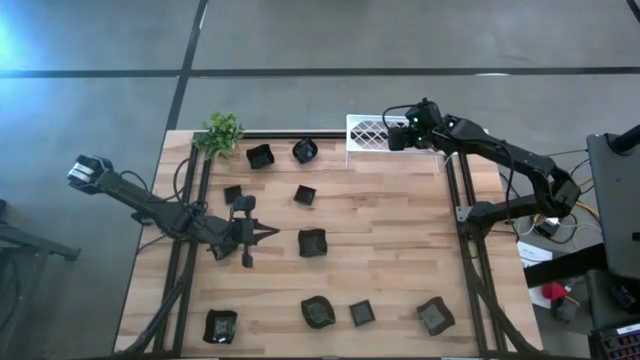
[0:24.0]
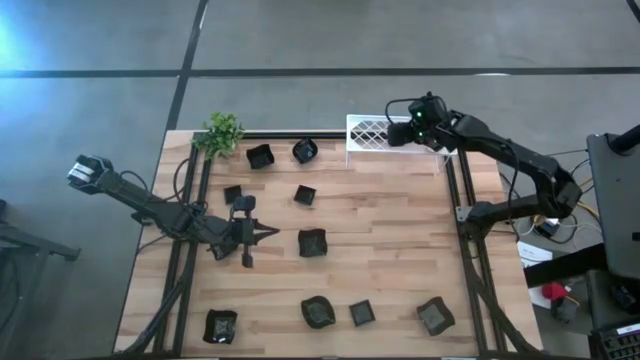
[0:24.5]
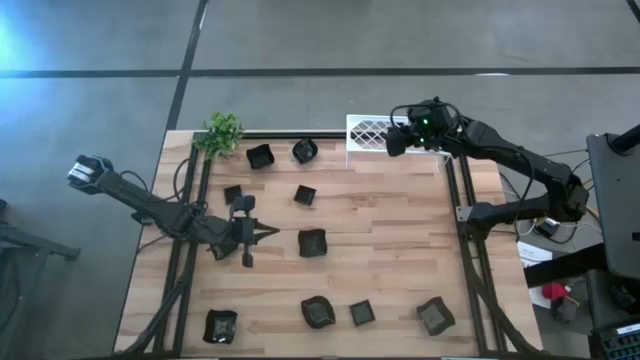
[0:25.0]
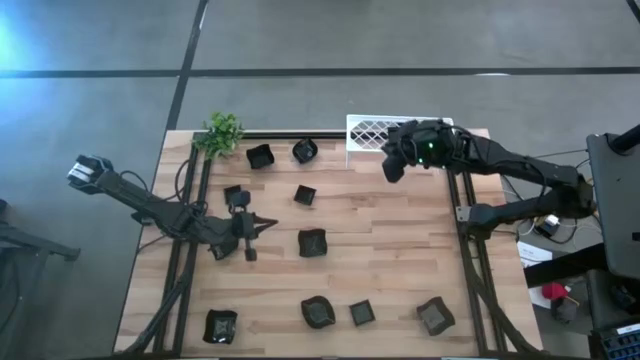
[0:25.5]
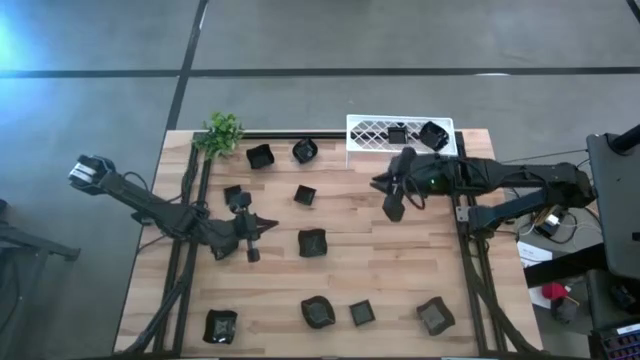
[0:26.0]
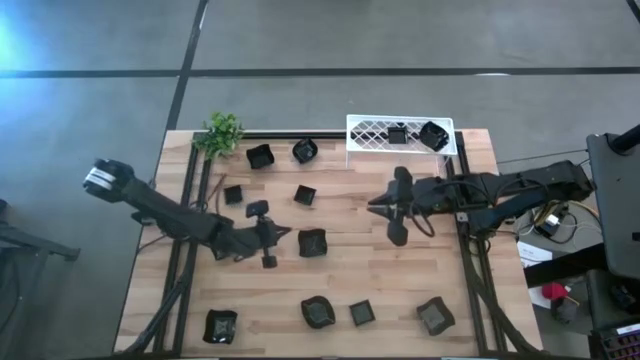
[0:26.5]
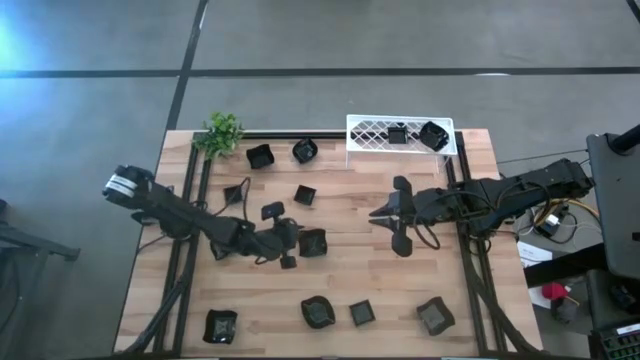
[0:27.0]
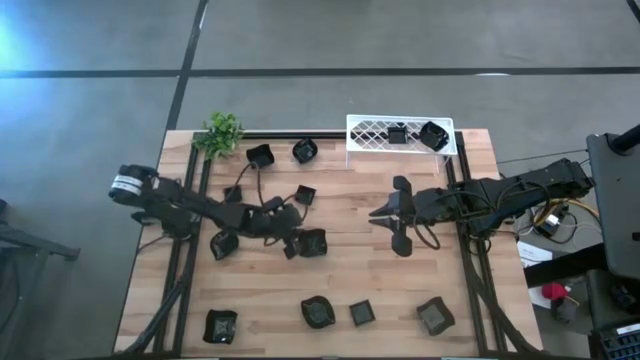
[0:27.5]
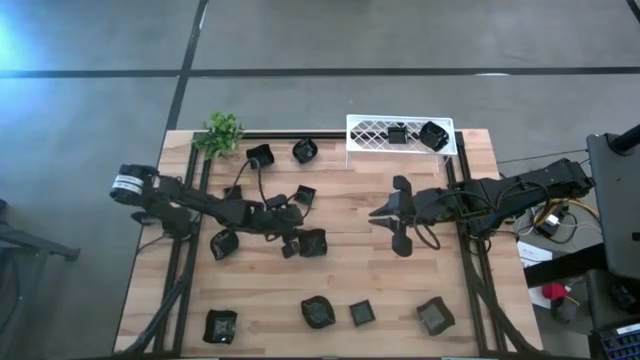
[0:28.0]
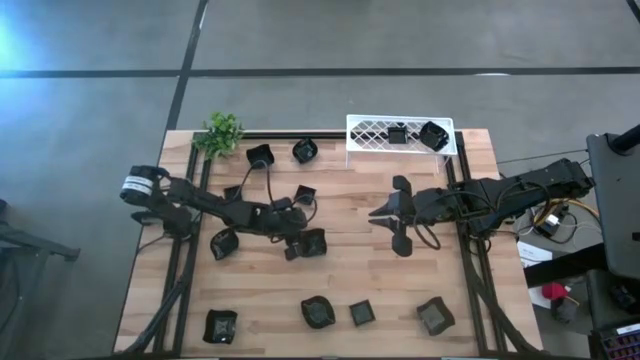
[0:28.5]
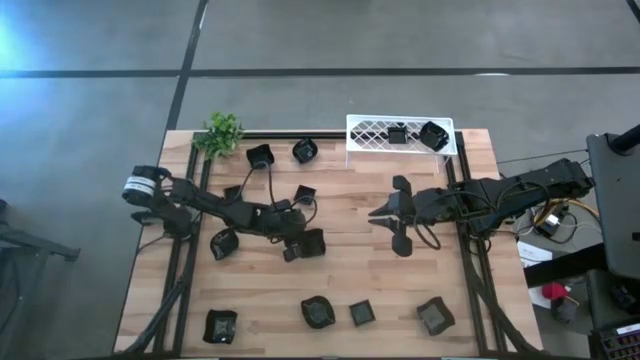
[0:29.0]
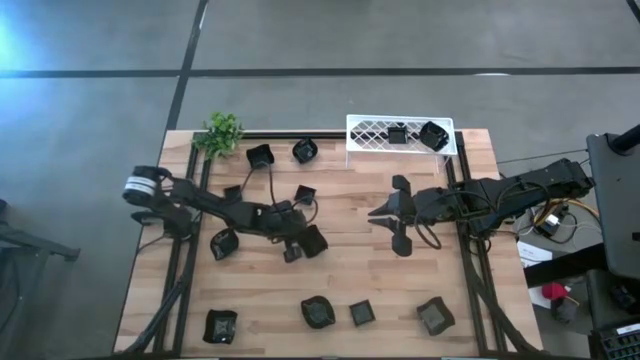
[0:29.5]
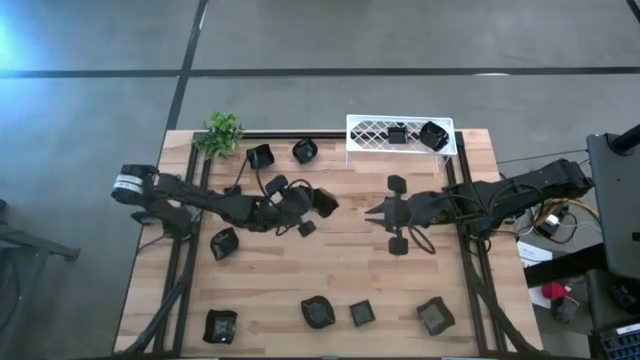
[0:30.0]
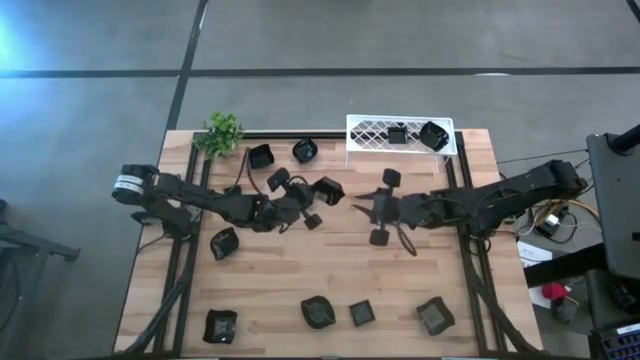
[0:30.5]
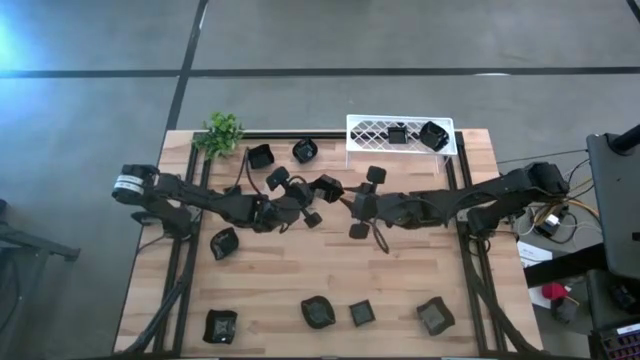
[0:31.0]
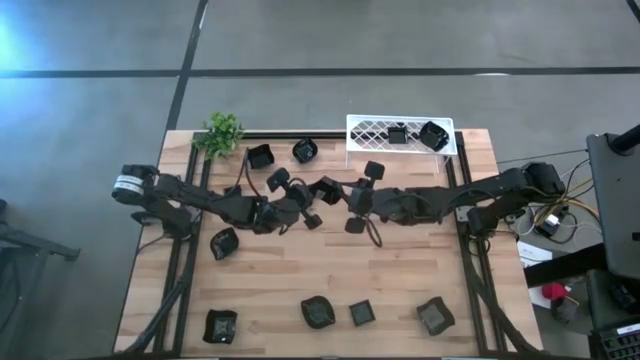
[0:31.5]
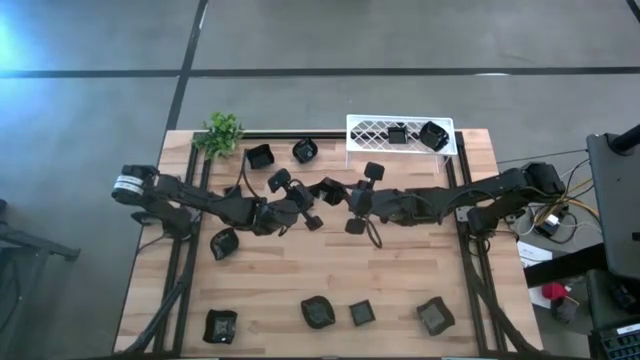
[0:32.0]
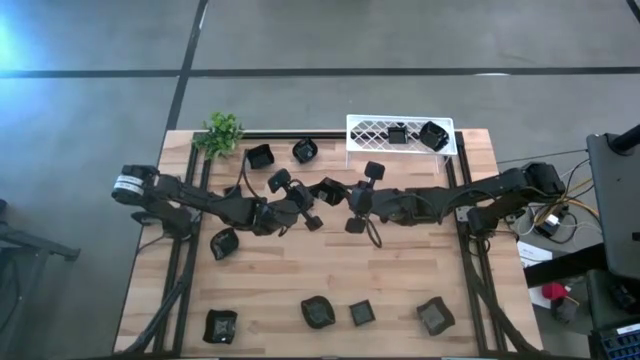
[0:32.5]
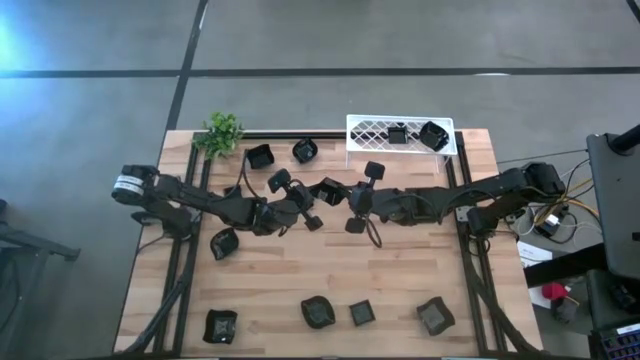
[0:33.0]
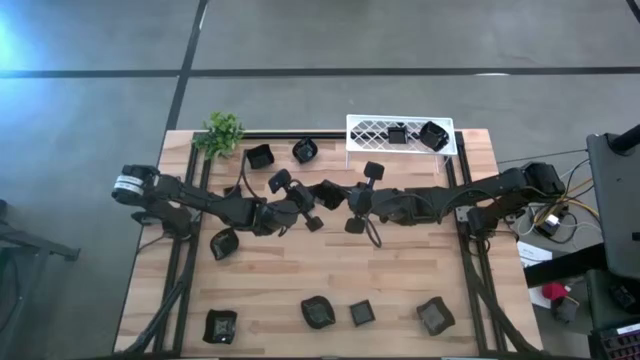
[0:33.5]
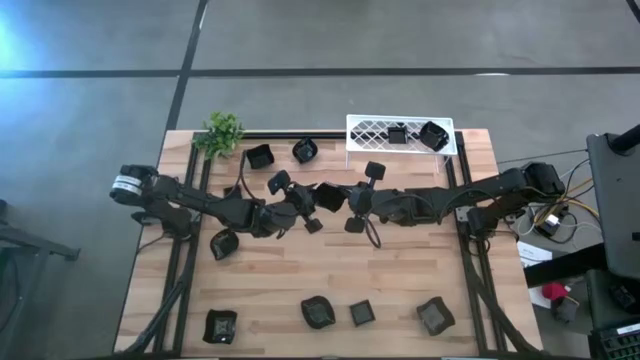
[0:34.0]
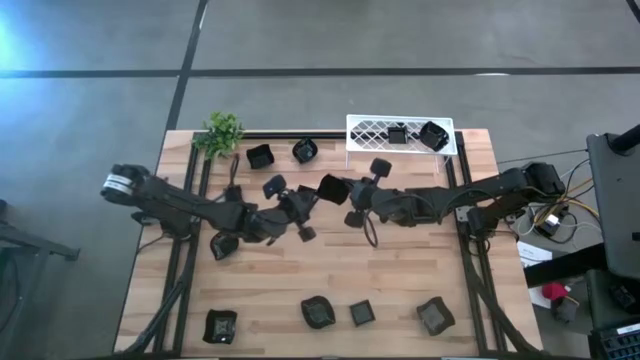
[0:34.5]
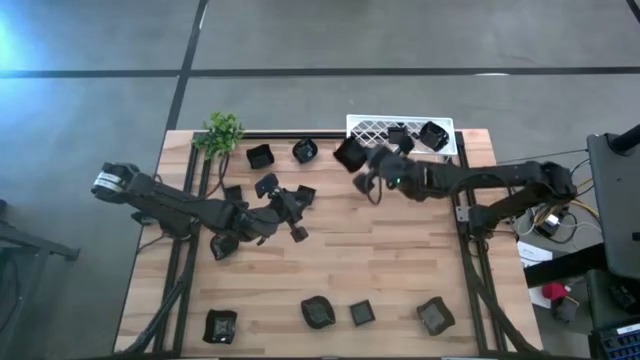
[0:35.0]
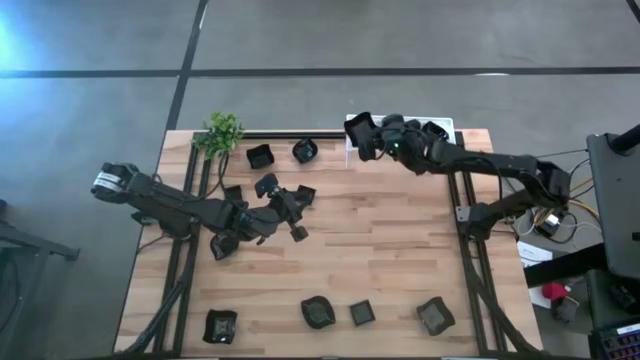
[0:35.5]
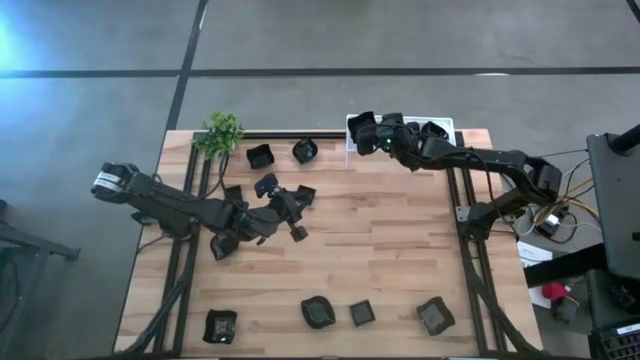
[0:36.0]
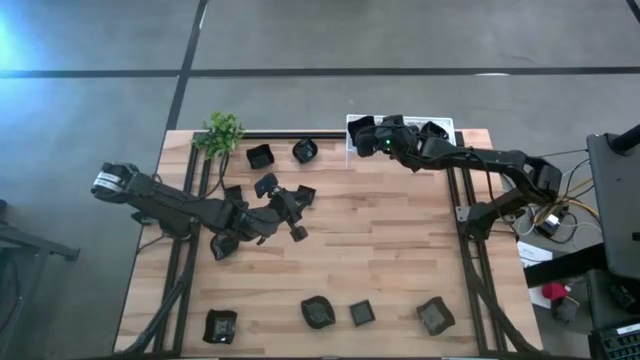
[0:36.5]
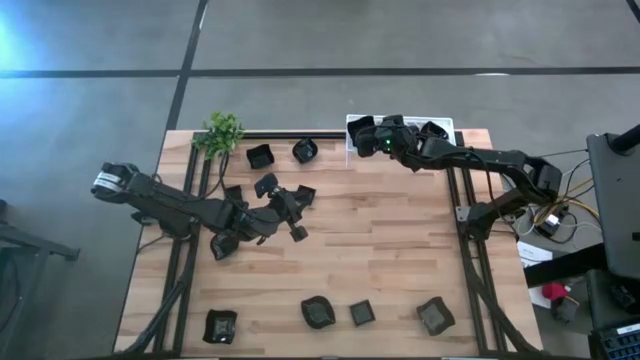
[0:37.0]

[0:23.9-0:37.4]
Task: Pick & Place Mini shaped plates
Put the black distorted square plate on the shelf

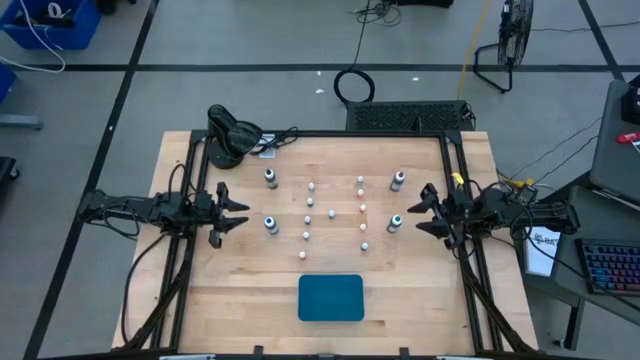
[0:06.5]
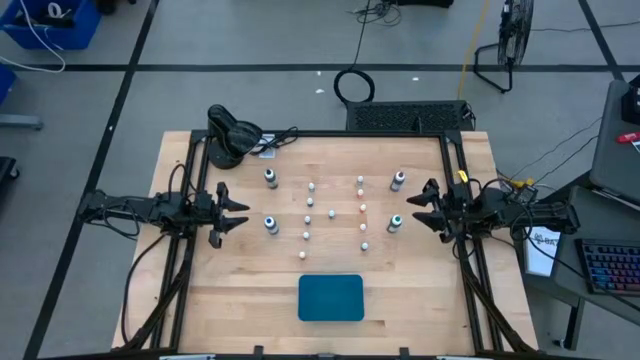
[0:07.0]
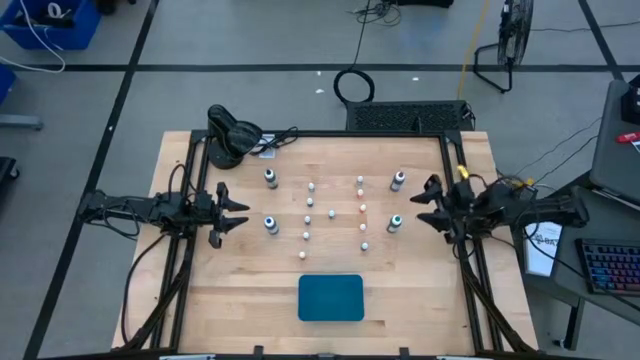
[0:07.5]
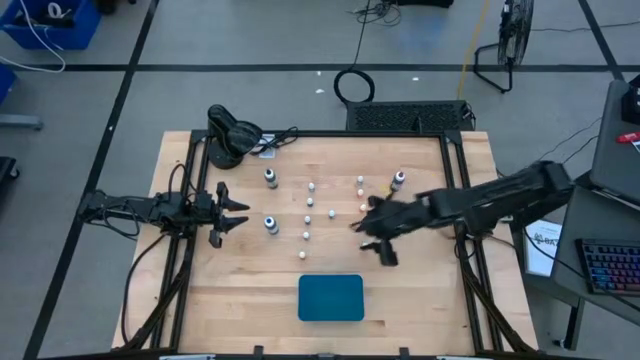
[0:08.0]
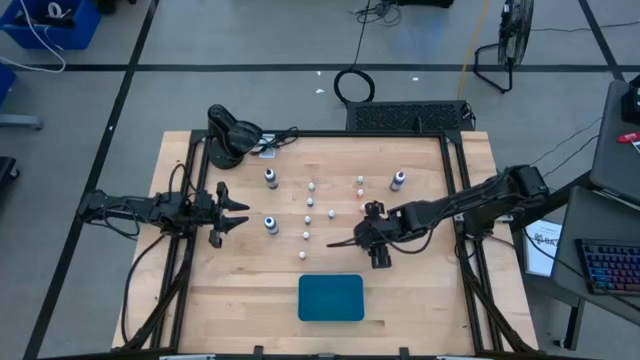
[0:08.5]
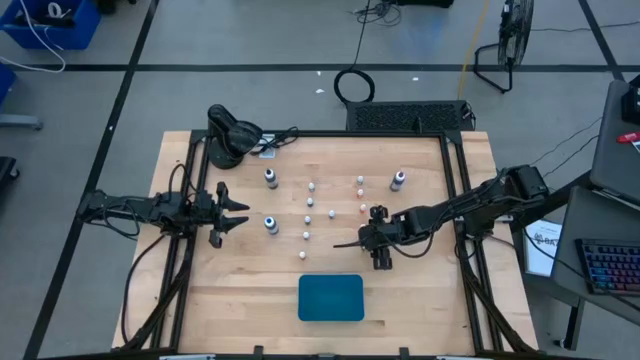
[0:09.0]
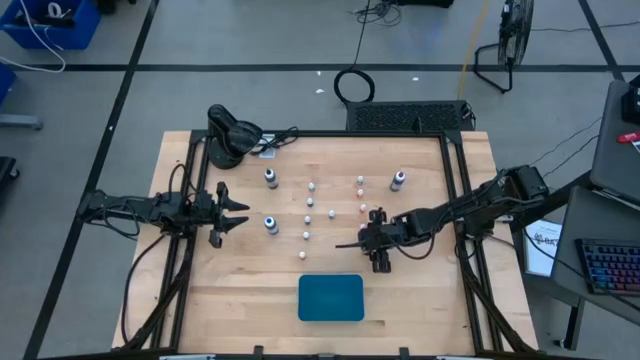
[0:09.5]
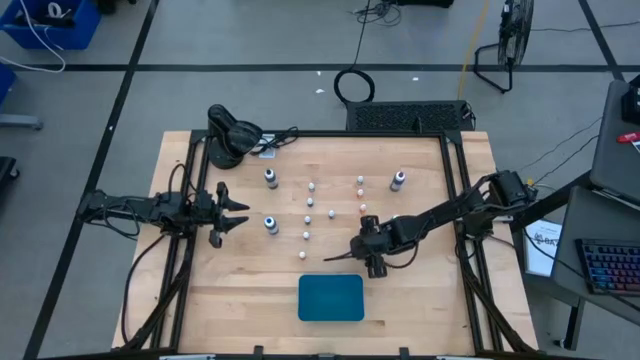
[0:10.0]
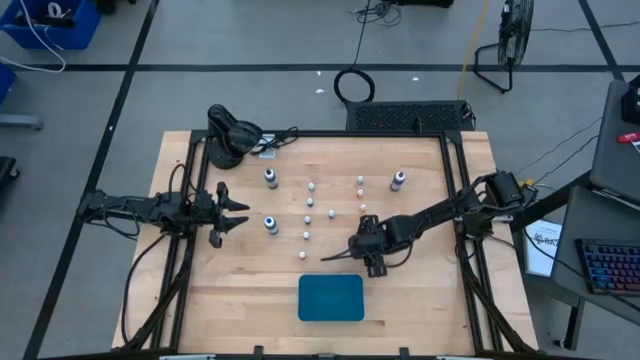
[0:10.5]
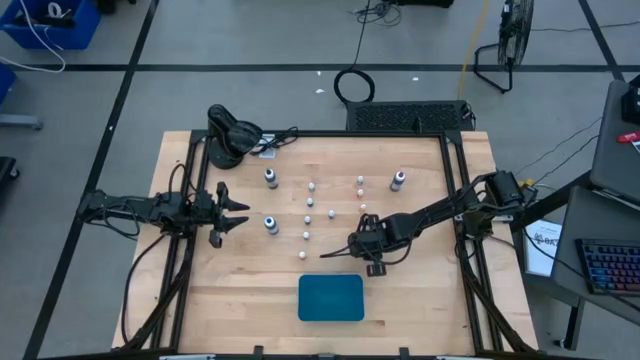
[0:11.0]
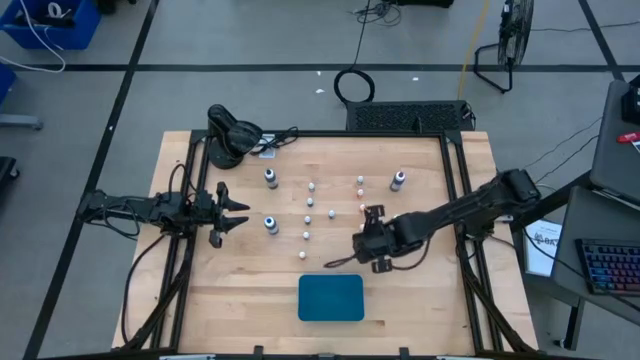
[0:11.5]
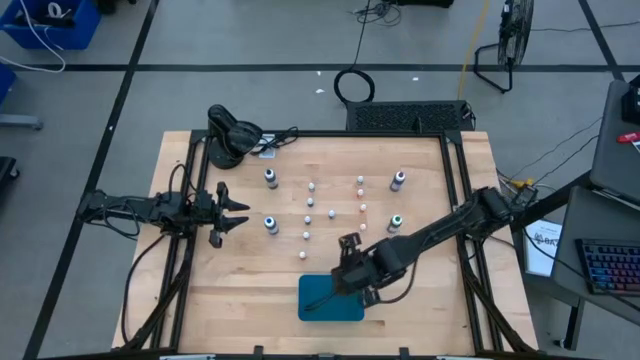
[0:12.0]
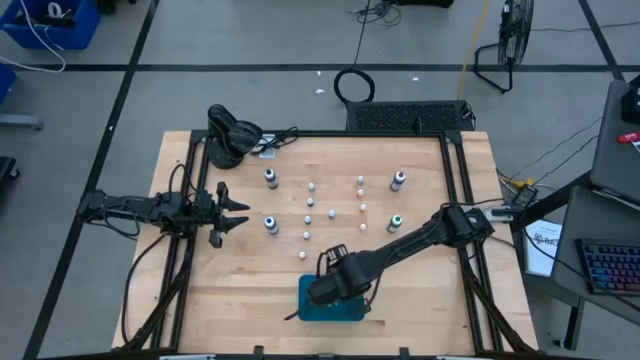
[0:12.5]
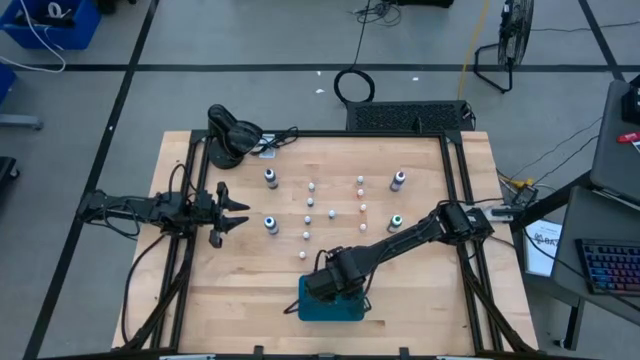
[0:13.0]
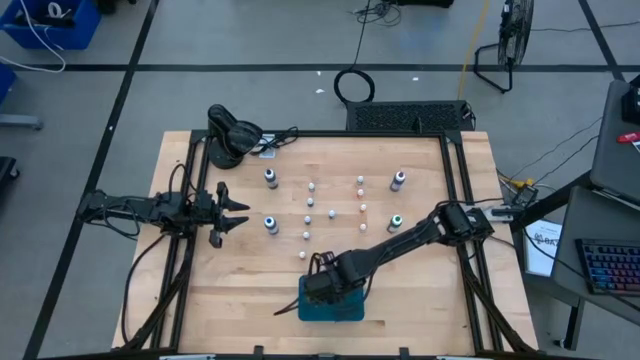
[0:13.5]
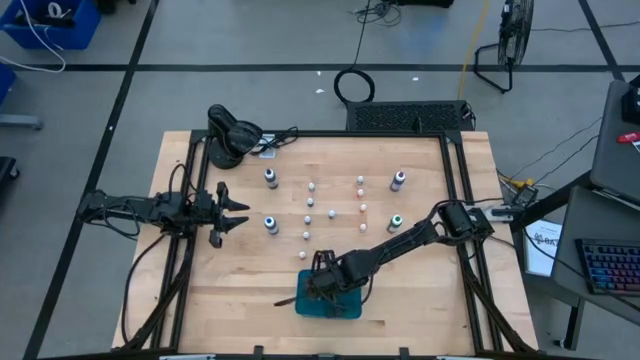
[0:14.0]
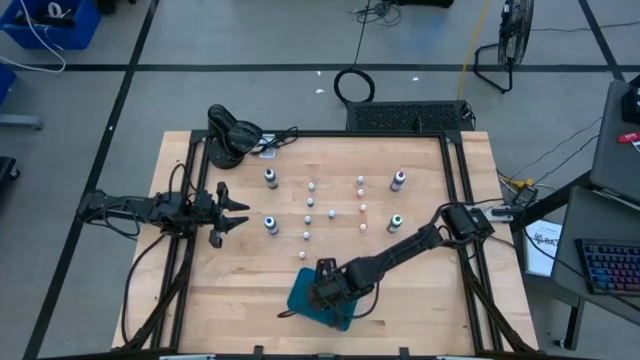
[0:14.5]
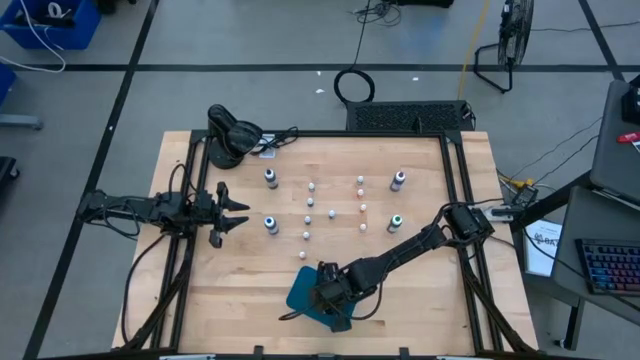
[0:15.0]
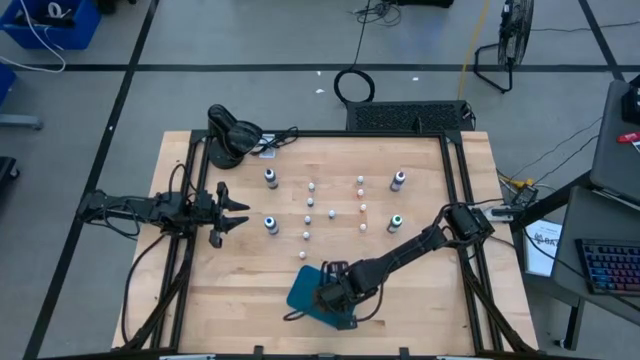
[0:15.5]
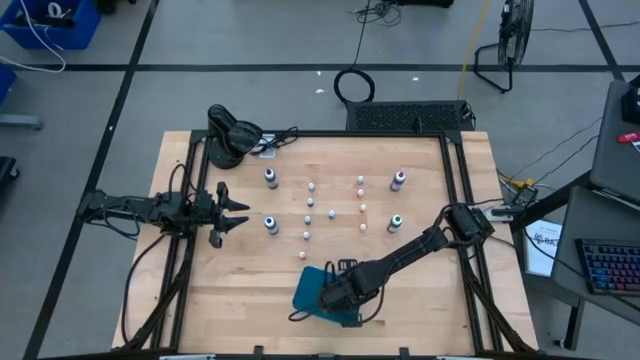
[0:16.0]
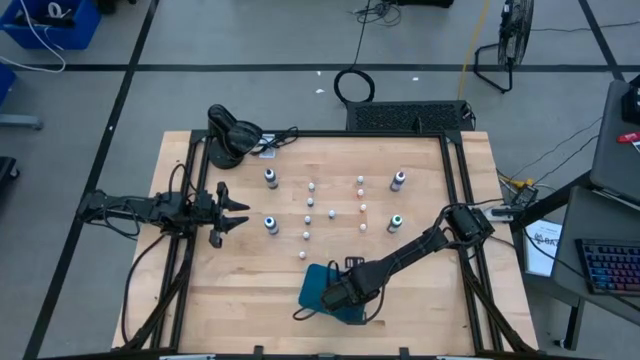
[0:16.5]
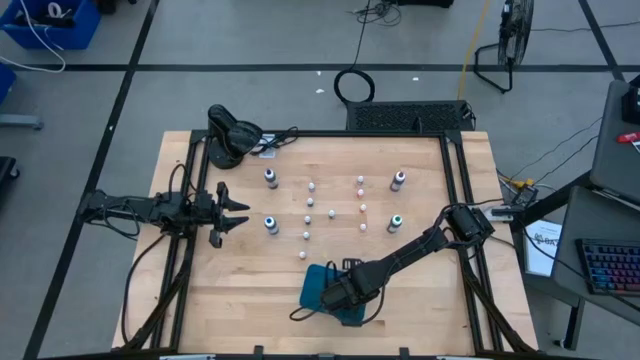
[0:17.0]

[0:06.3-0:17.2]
Task: Pick & Place food coloring
Put the small purple coloring bottle into the blue bin
